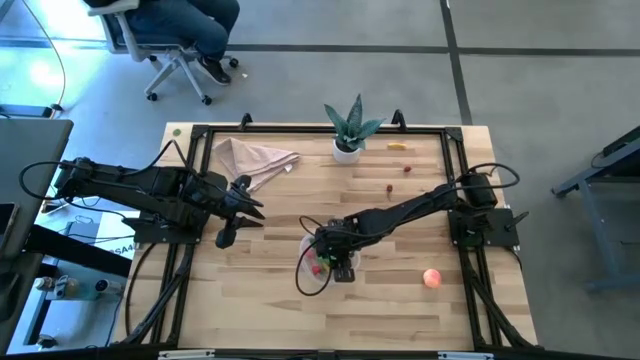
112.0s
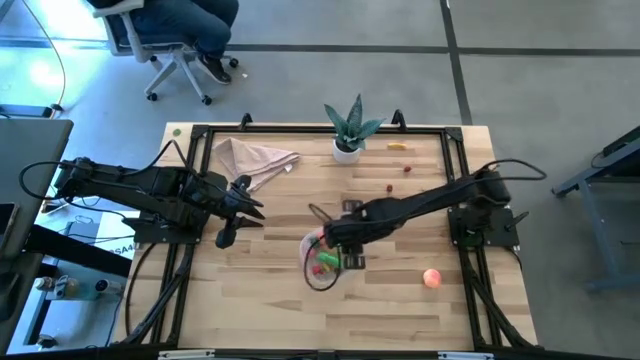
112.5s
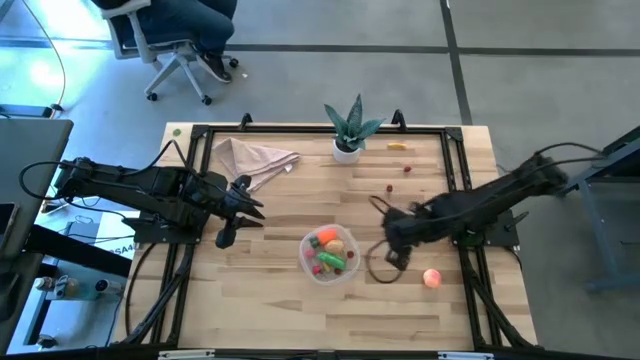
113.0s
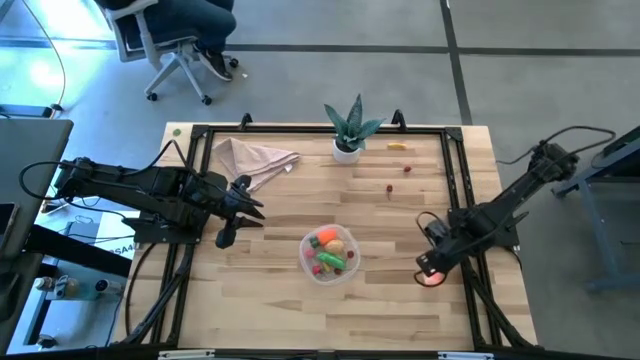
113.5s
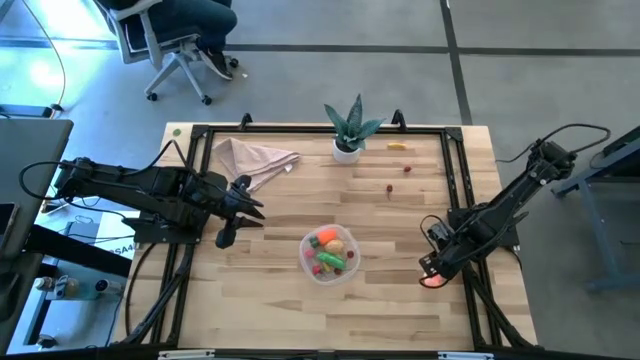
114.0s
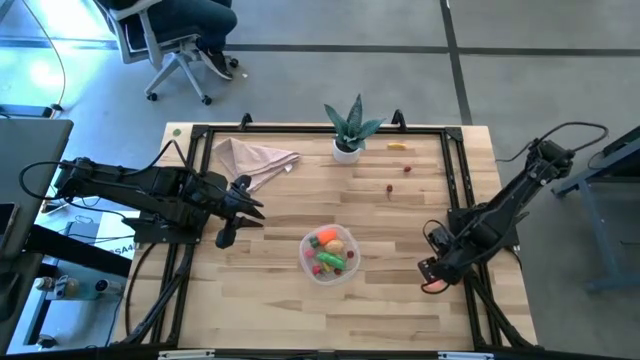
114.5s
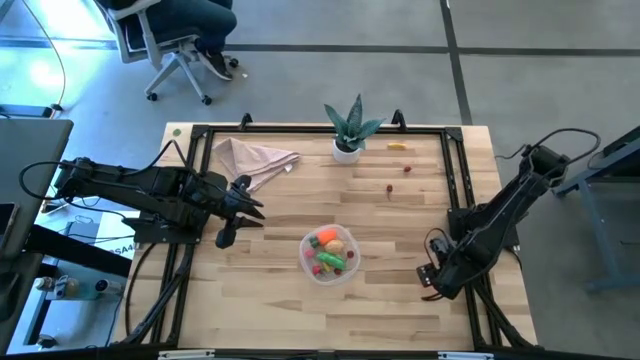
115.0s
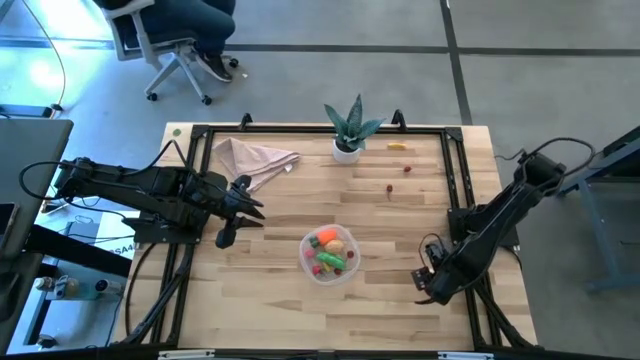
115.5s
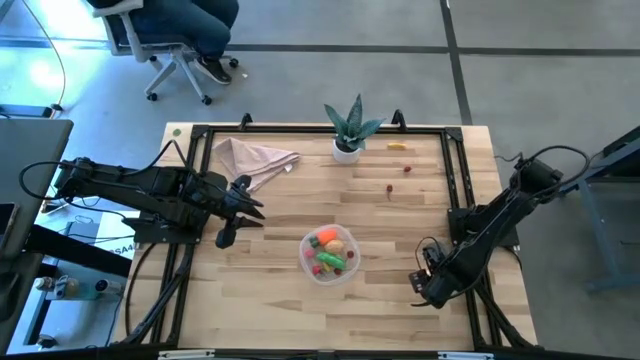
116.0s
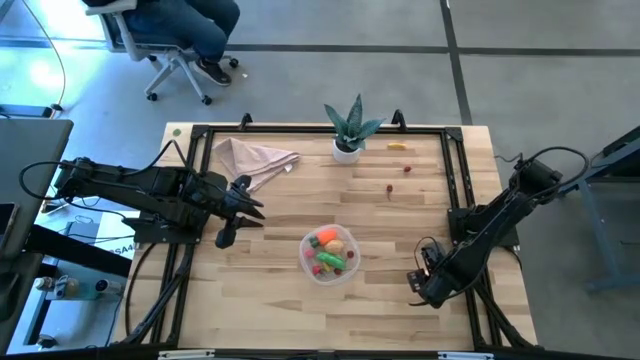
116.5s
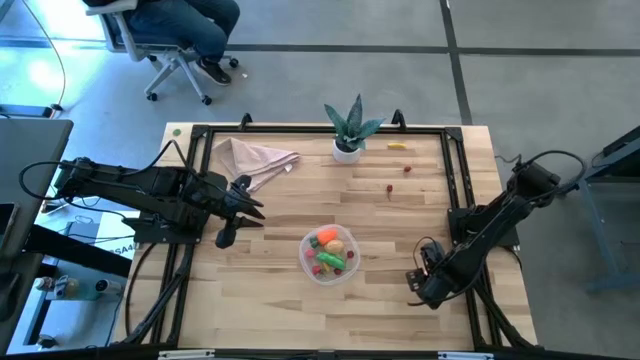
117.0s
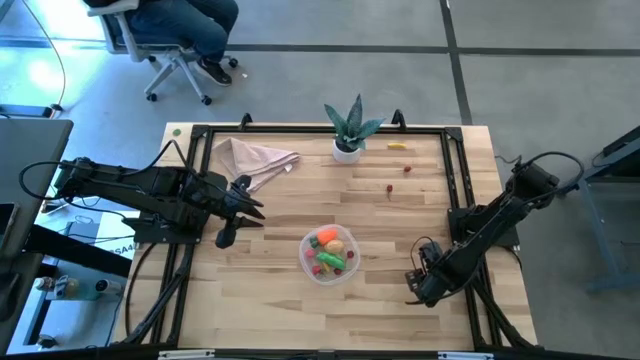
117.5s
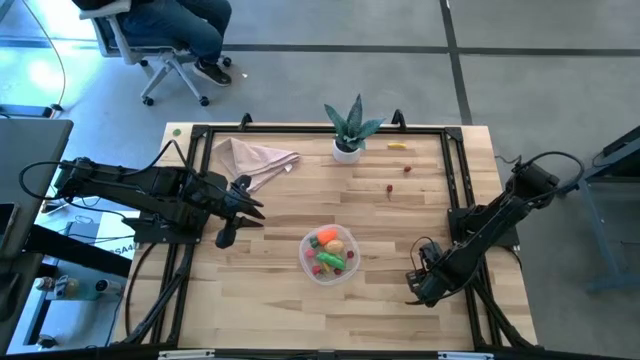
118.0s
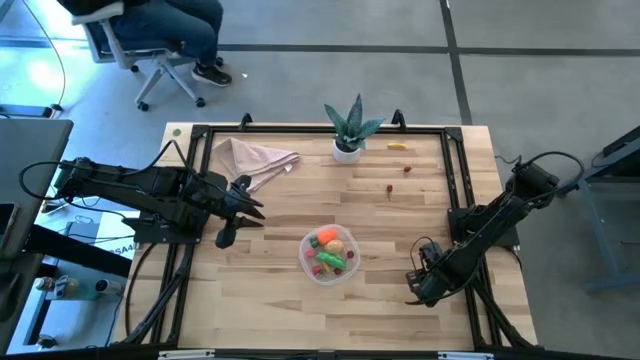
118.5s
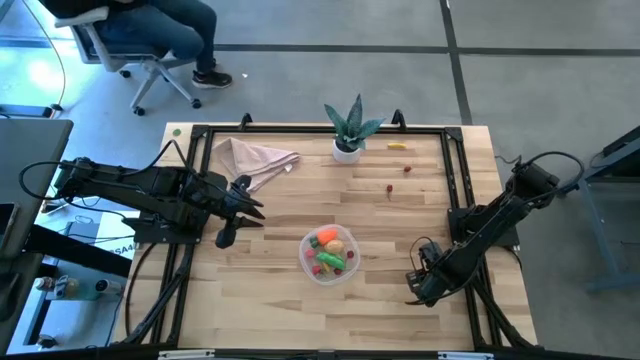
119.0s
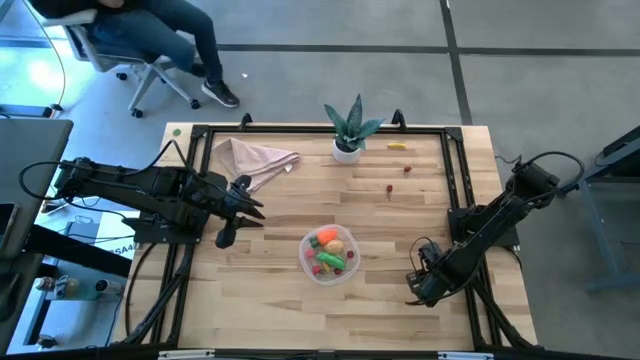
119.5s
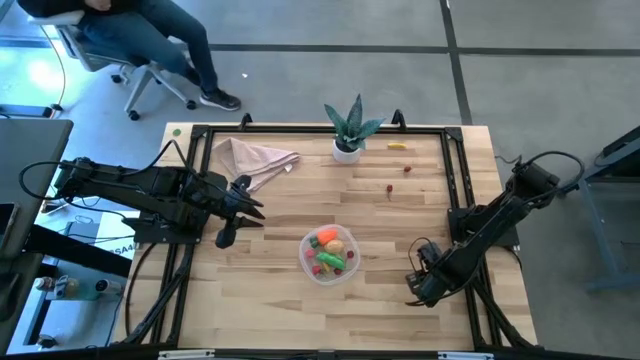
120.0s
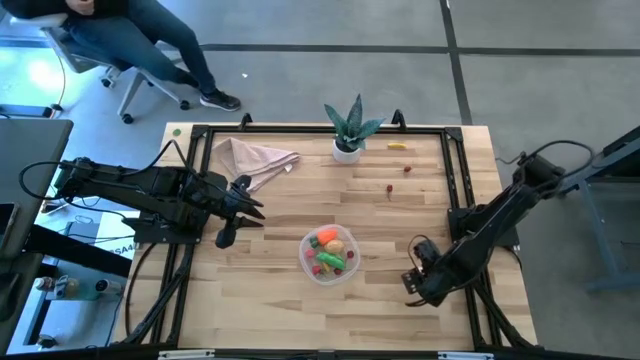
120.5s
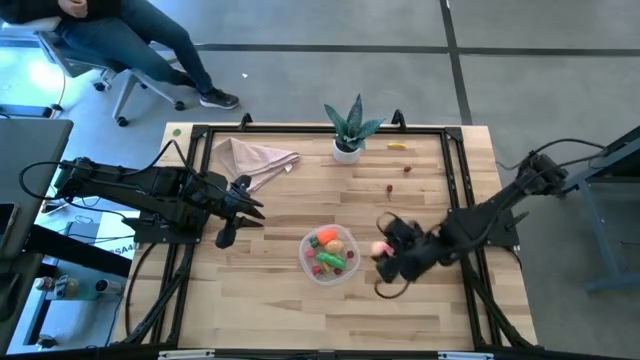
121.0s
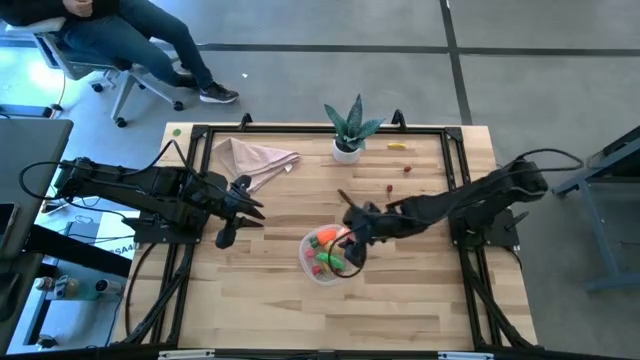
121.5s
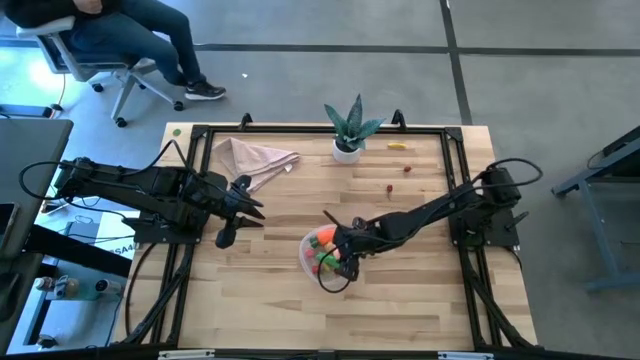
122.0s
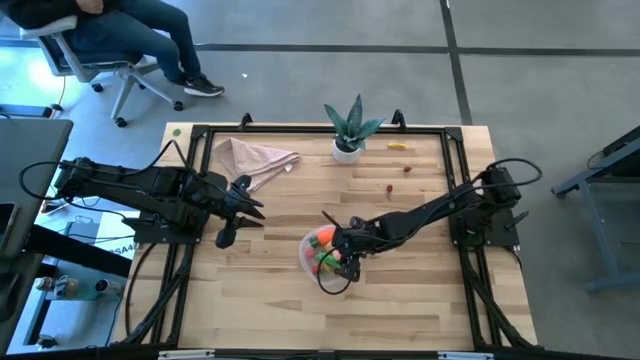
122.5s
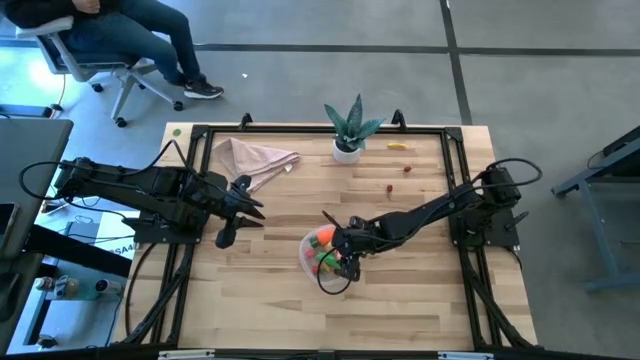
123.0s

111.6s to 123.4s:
Task: Pick and placing Produce into tupperware
Put the peach into the transparent container

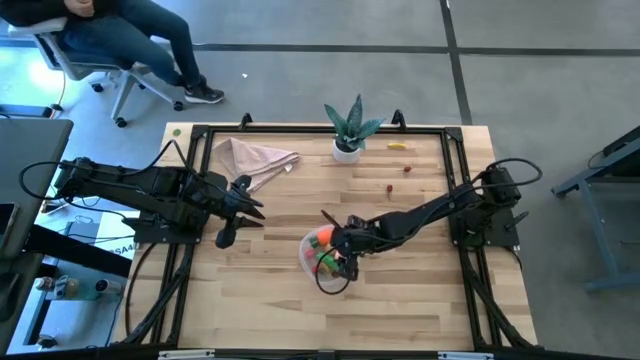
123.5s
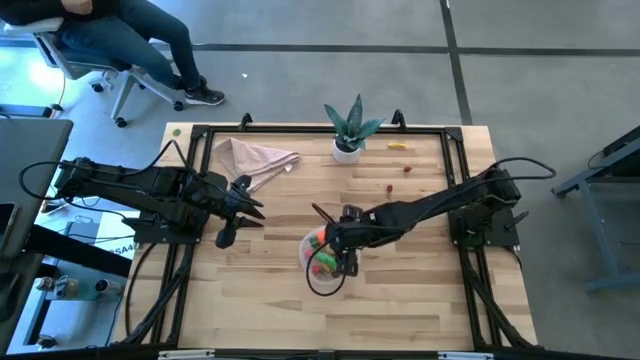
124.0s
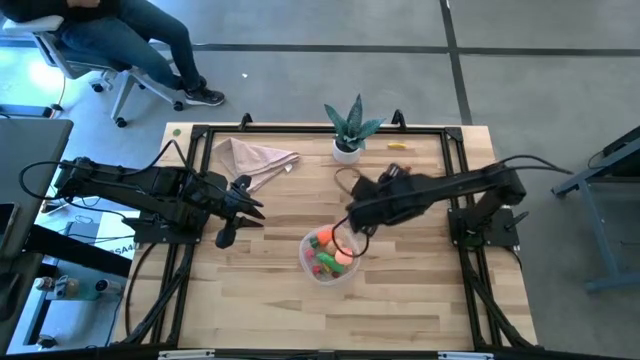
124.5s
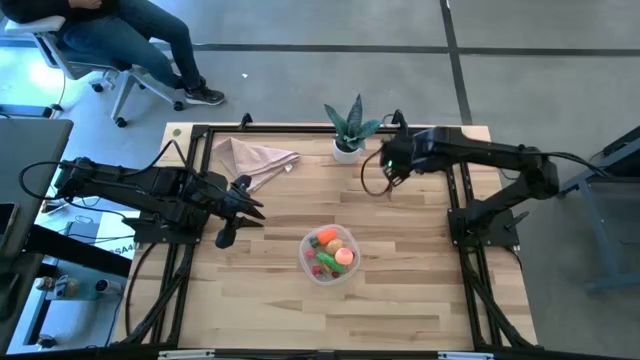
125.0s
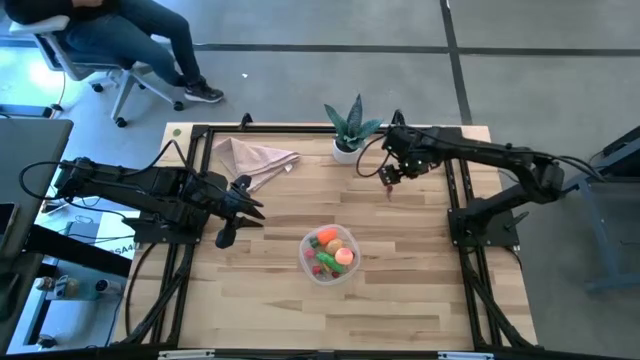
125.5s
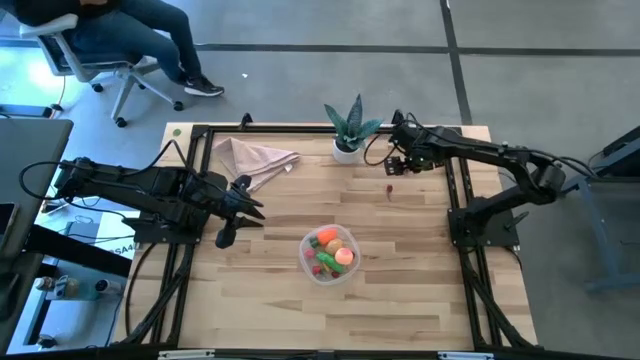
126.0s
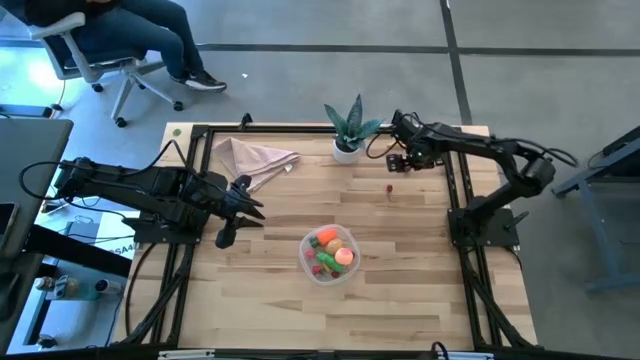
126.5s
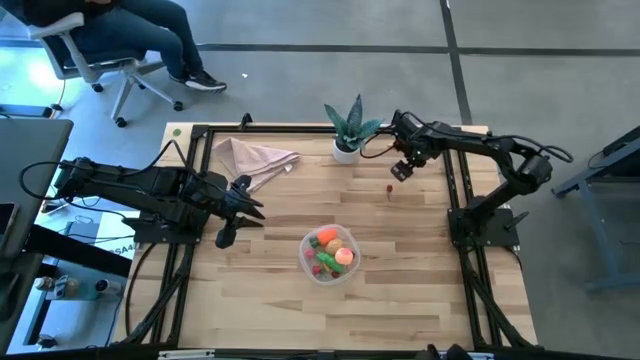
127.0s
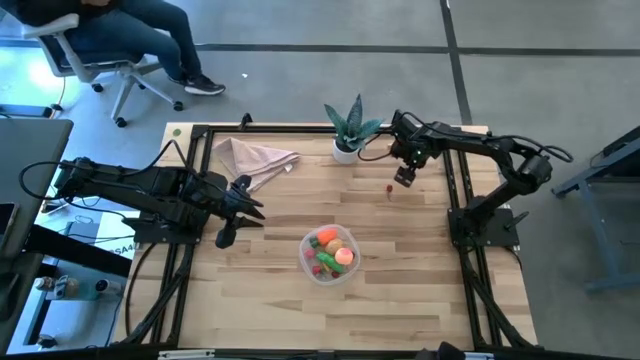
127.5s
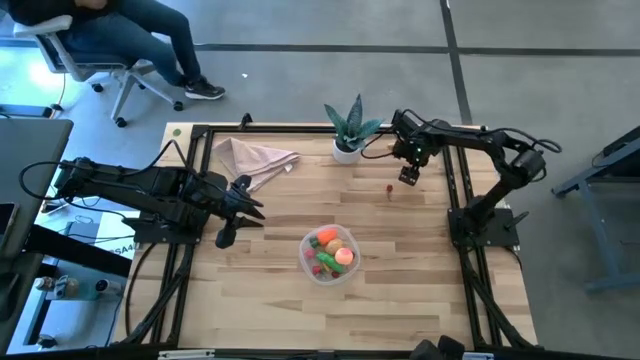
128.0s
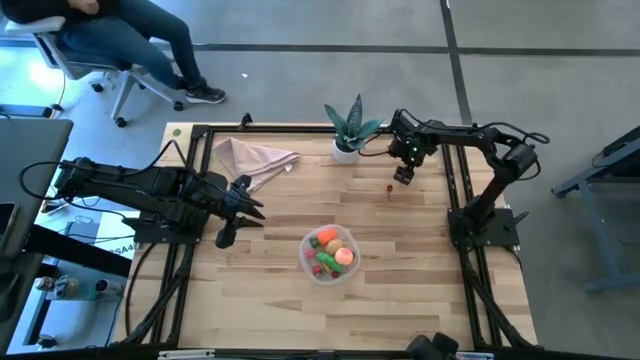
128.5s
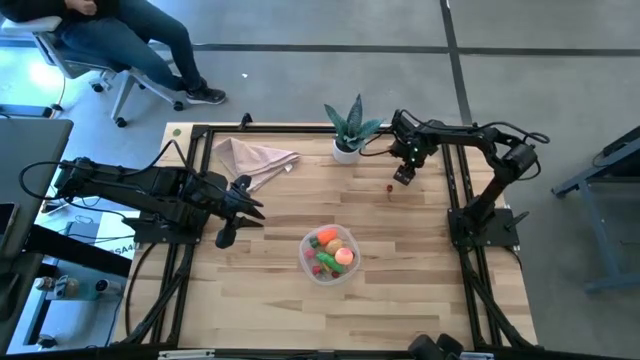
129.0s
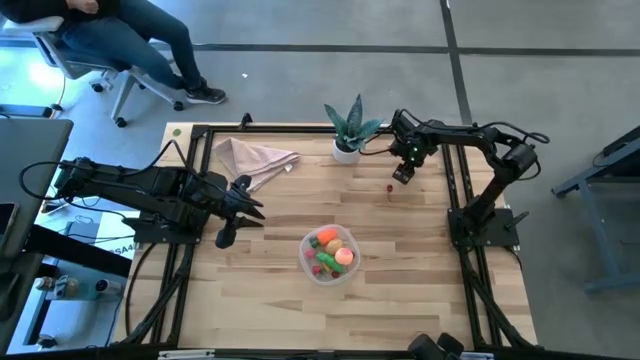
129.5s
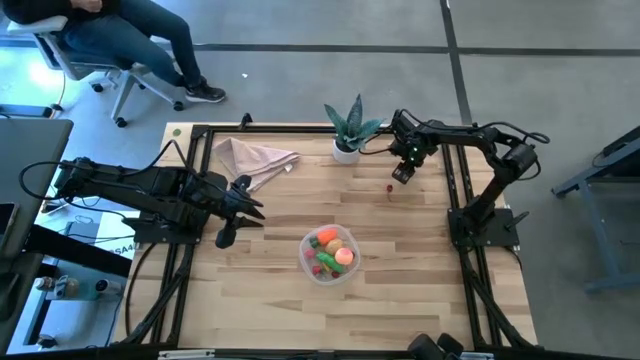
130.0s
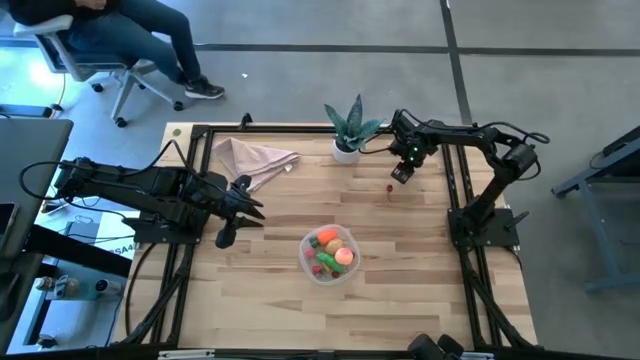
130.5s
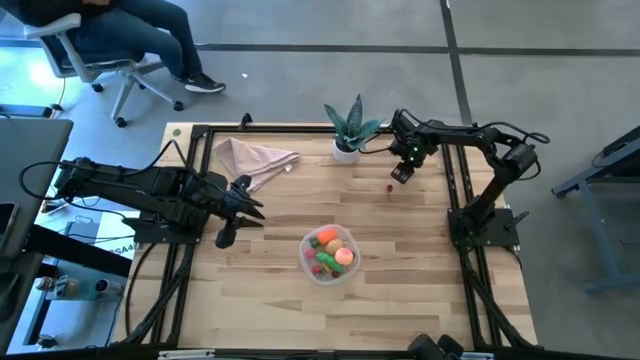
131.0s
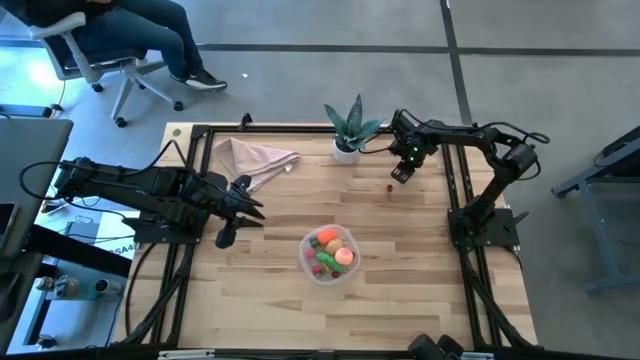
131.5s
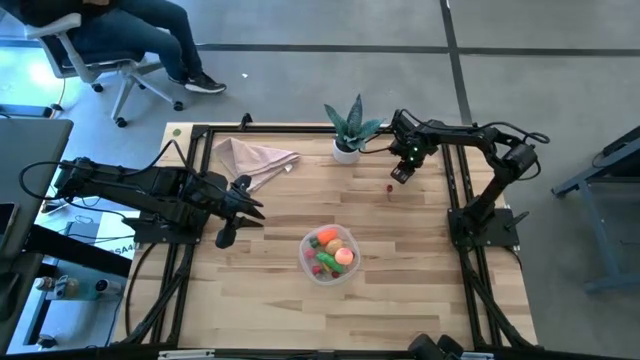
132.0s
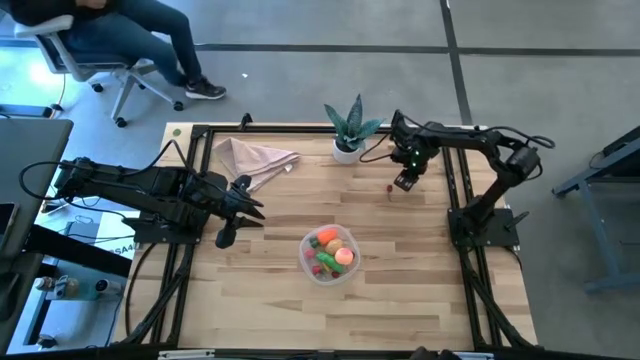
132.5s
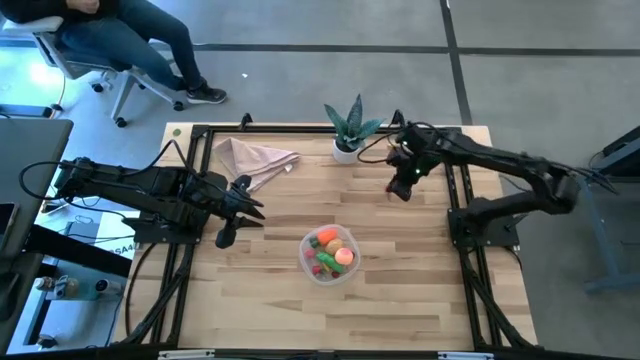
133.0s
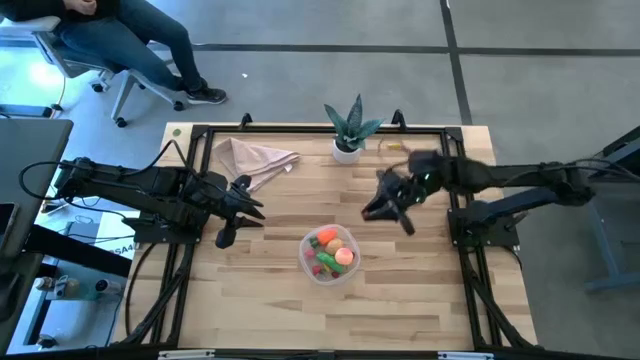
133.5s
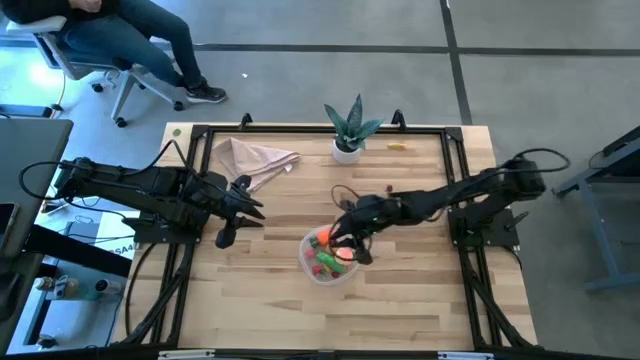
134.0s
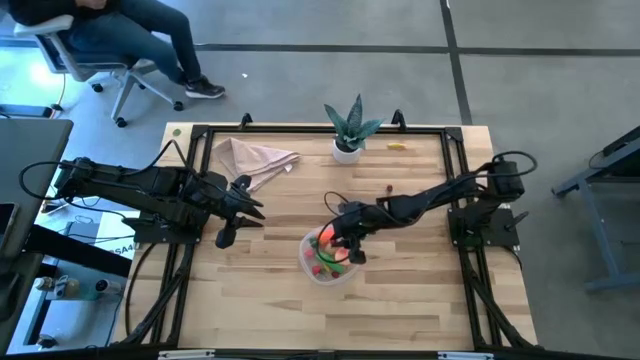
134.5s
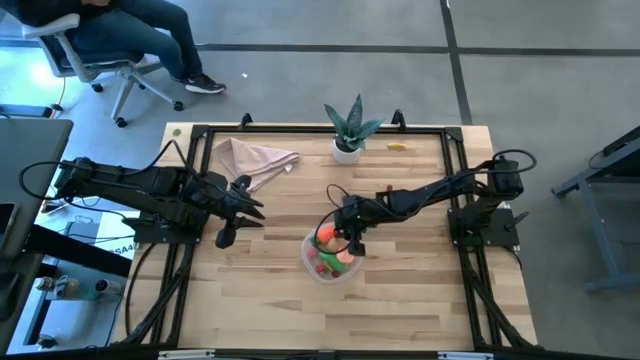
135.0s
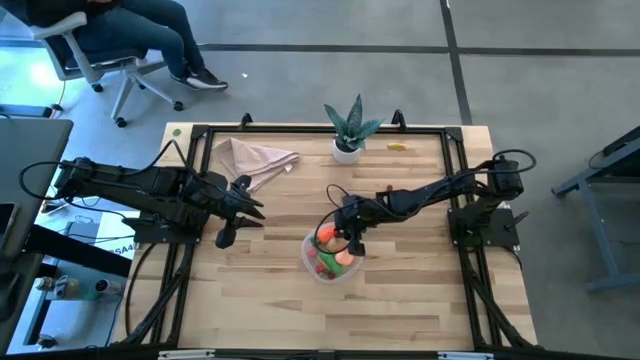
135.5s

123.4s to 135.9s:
Put the top cherry into the transparent container
